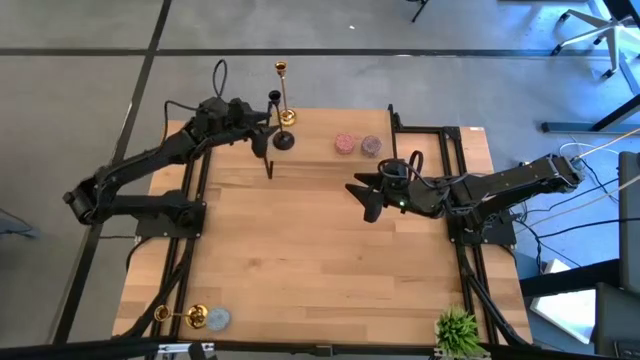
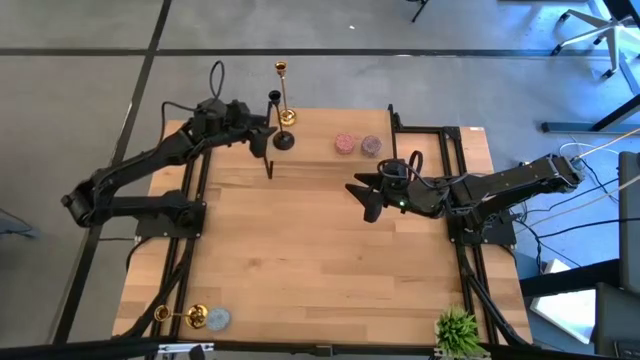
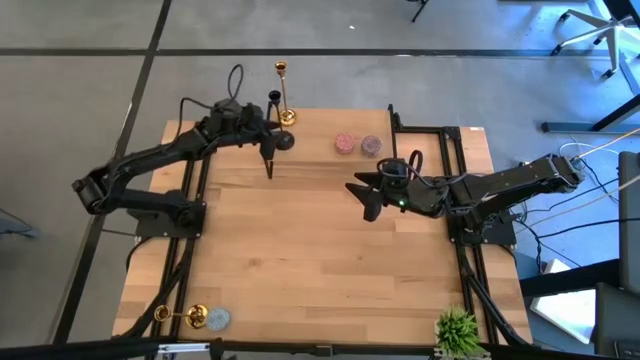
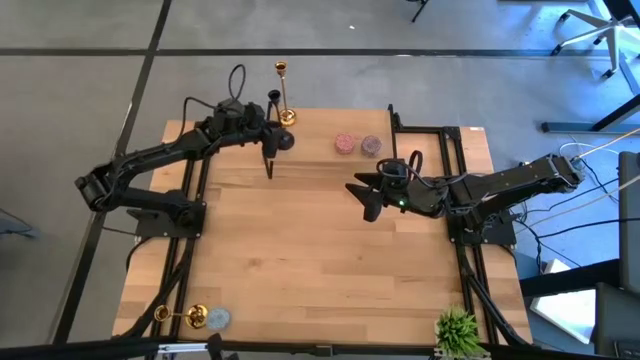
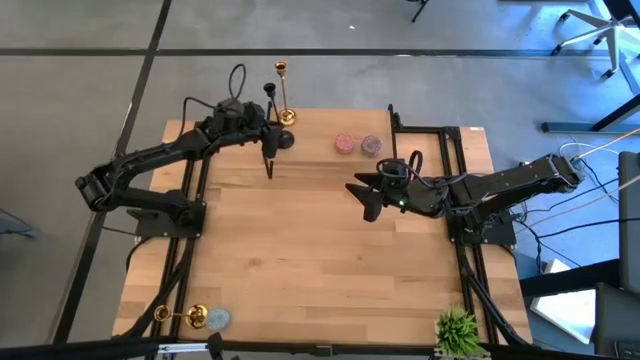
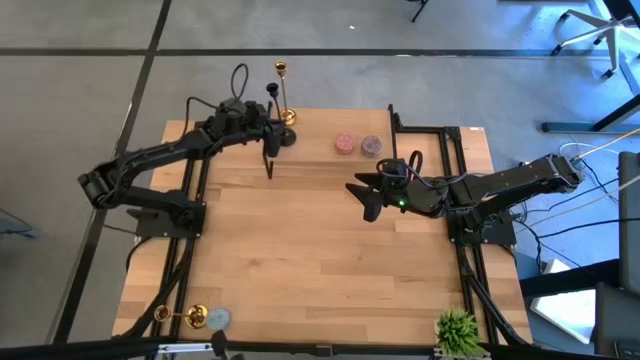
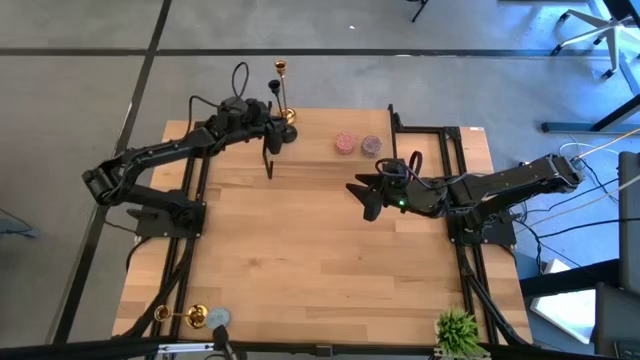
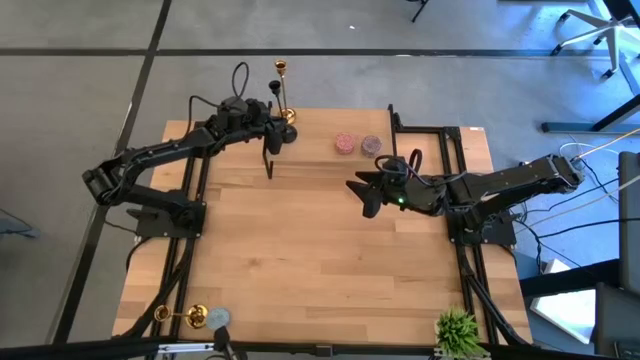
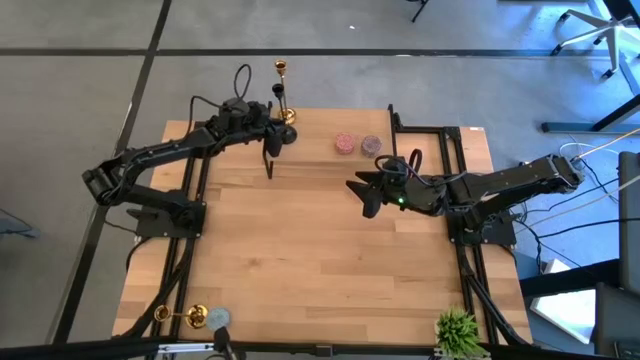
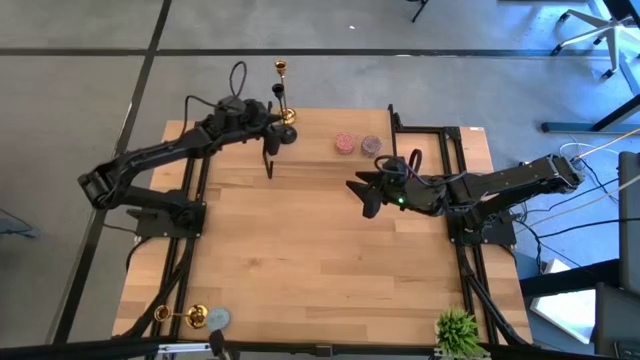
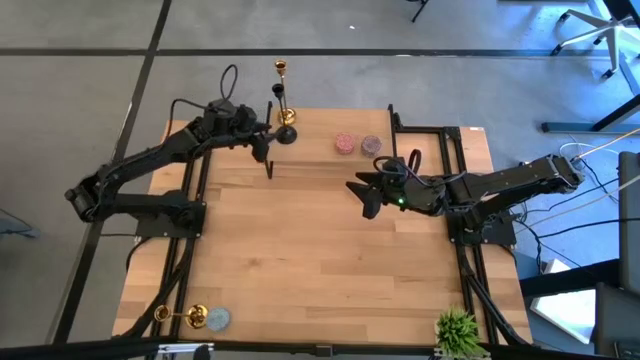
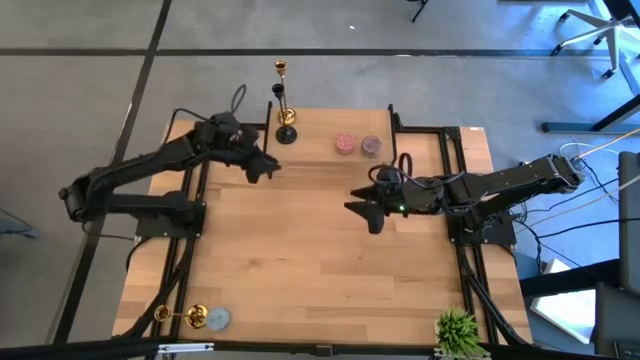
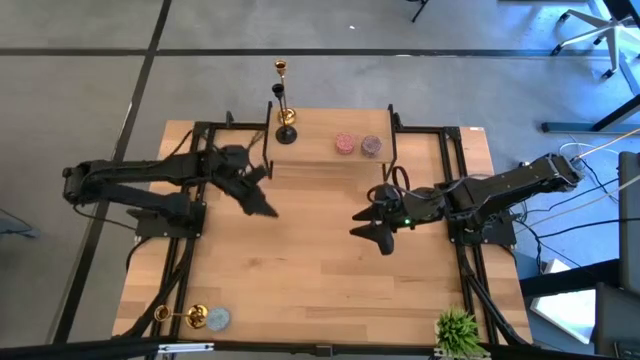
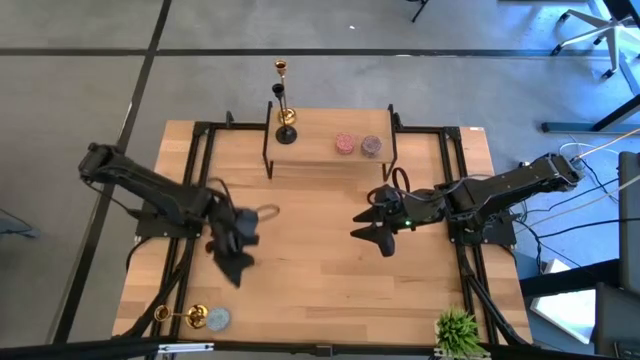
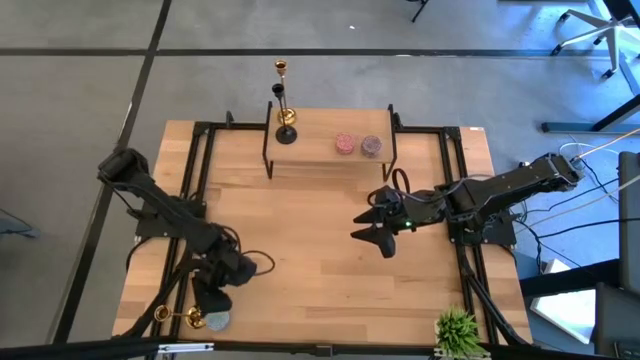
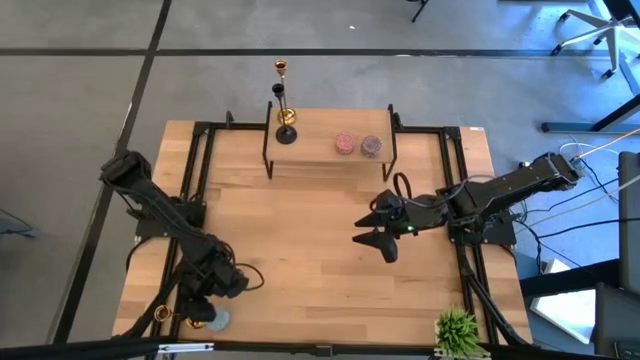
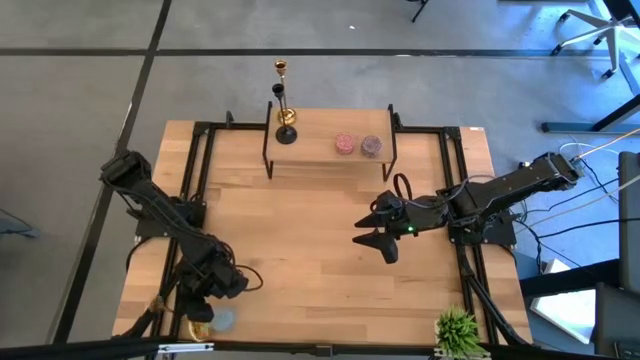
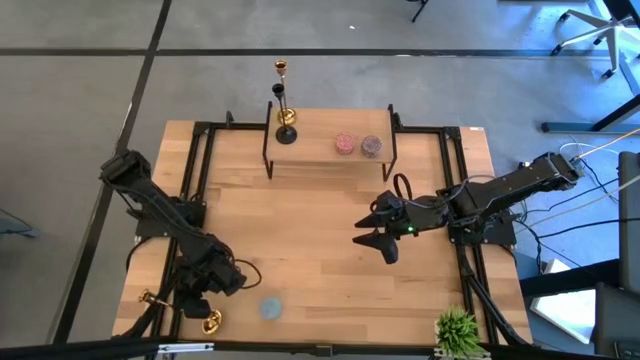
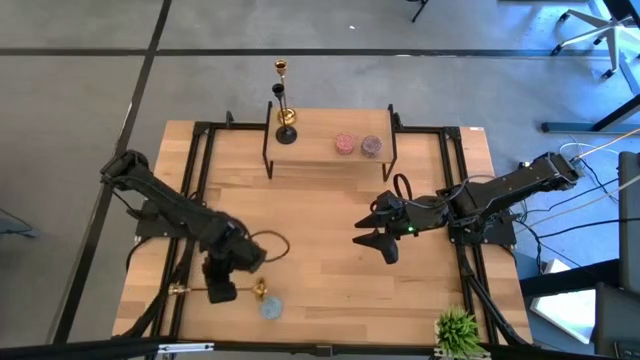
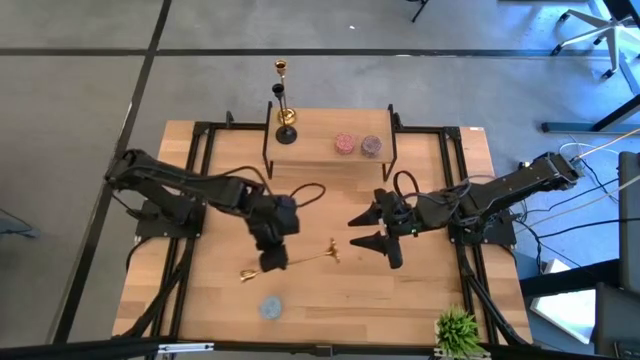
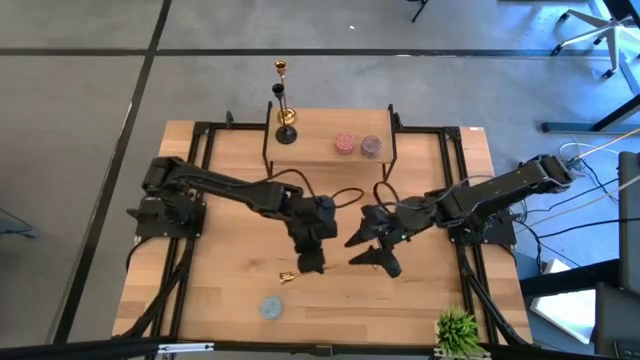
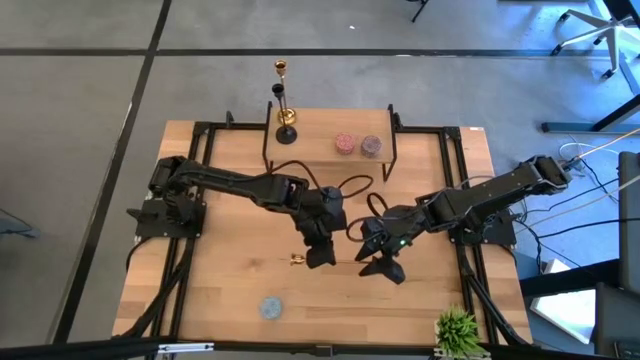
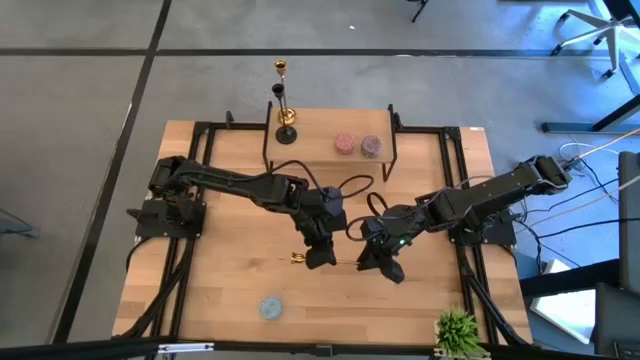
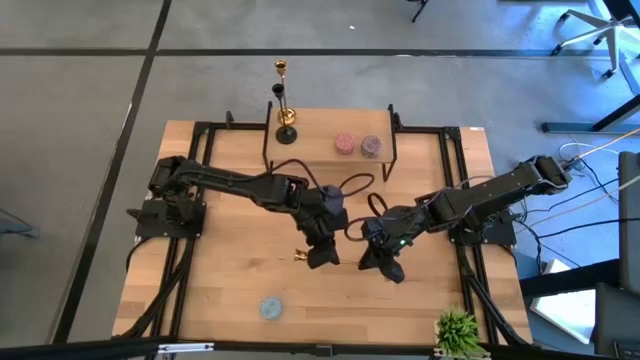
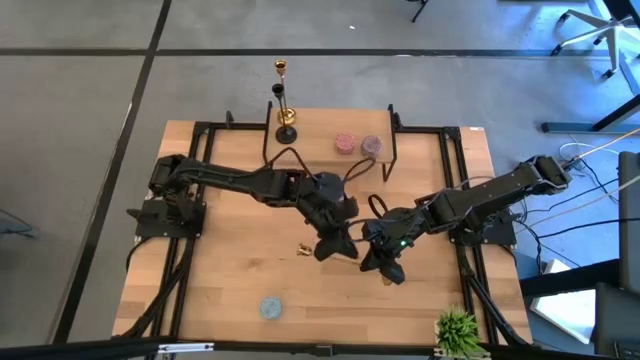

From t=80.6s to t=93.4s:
Task: Pick & Place candle stick holders
Put the gold brass candlestick on the shelf

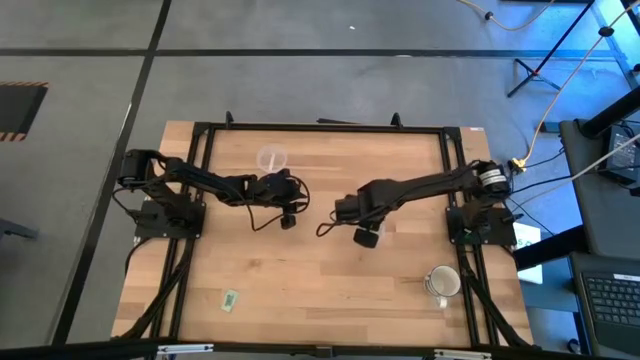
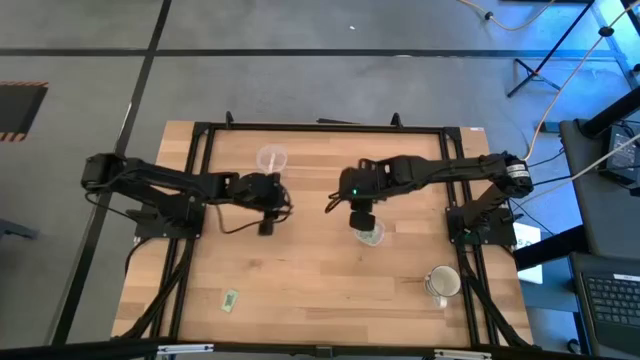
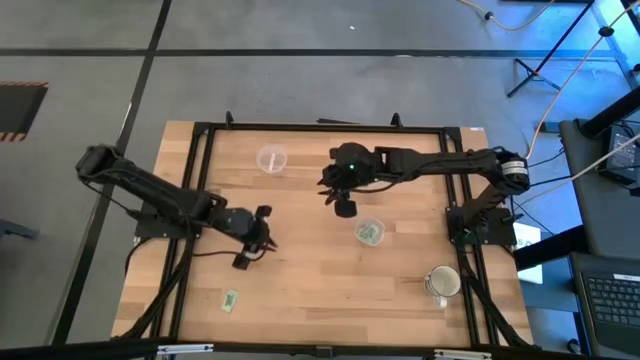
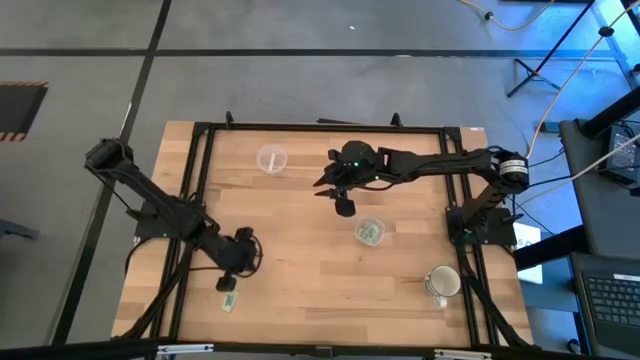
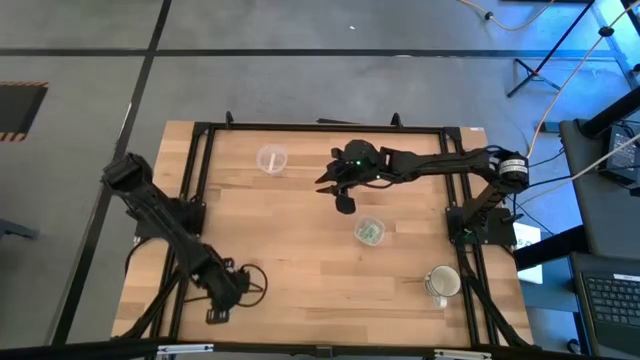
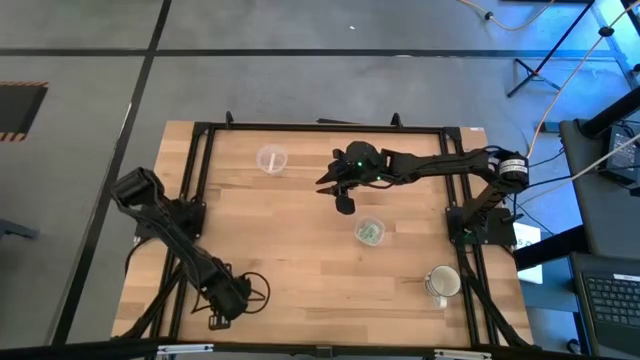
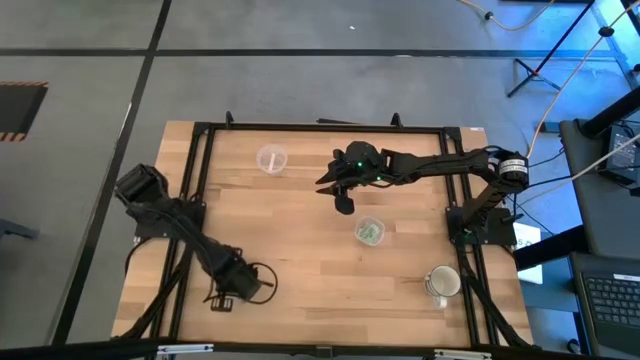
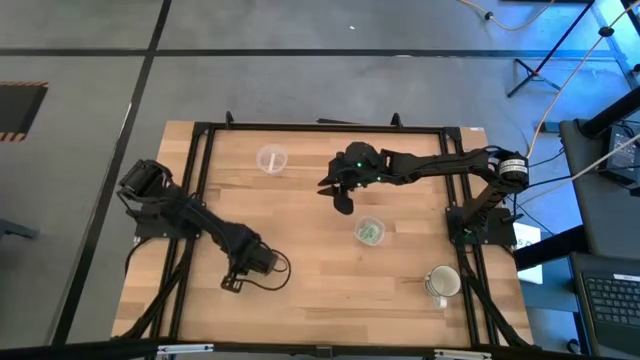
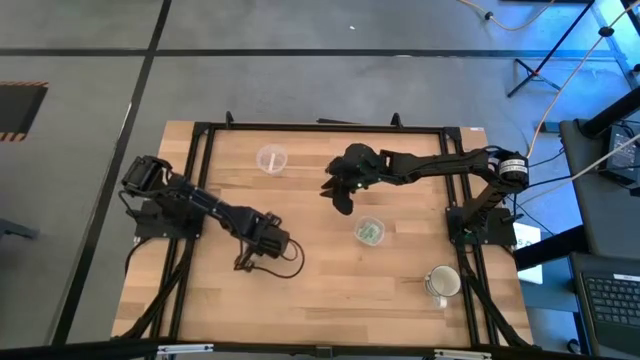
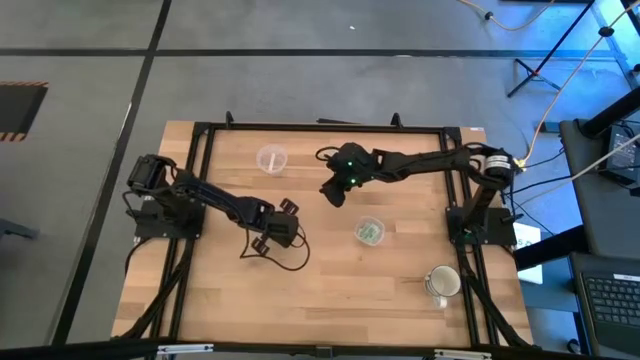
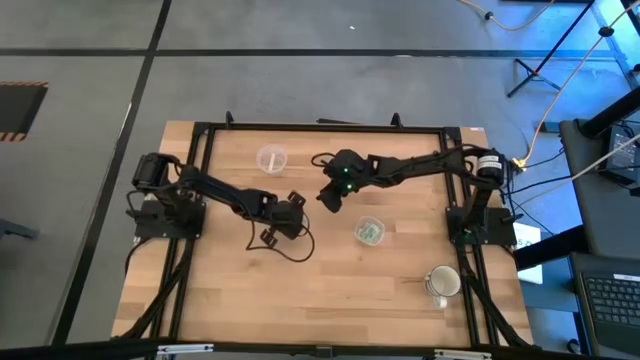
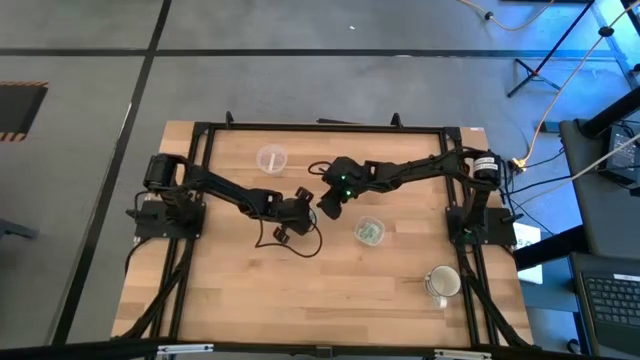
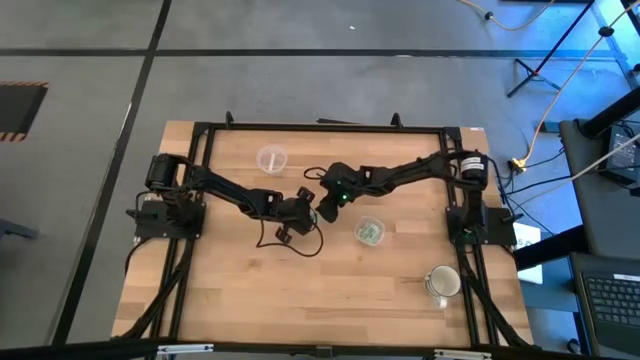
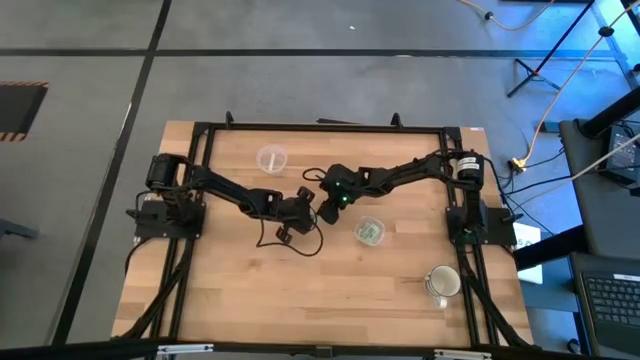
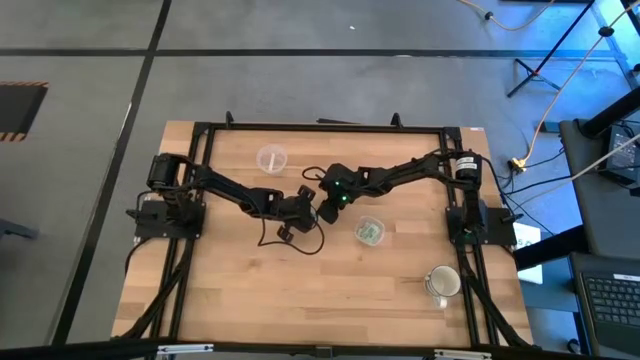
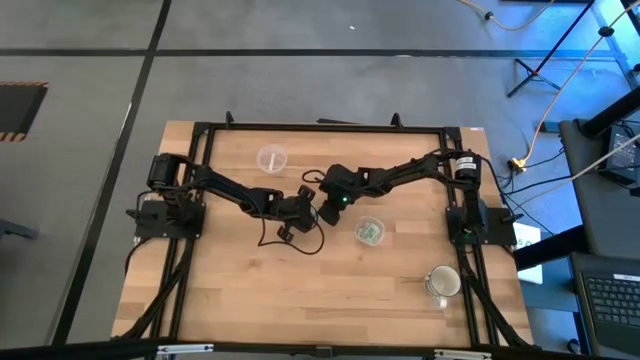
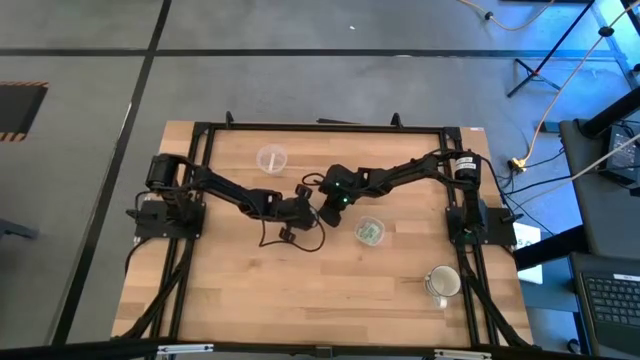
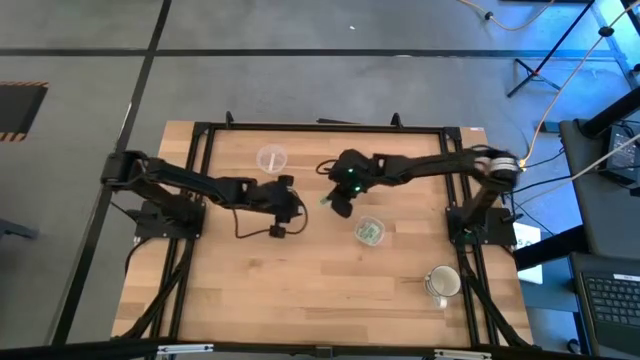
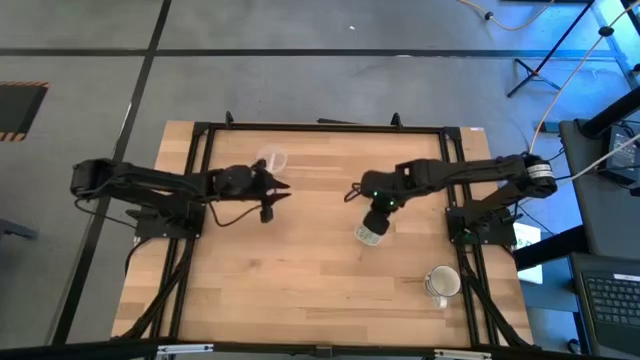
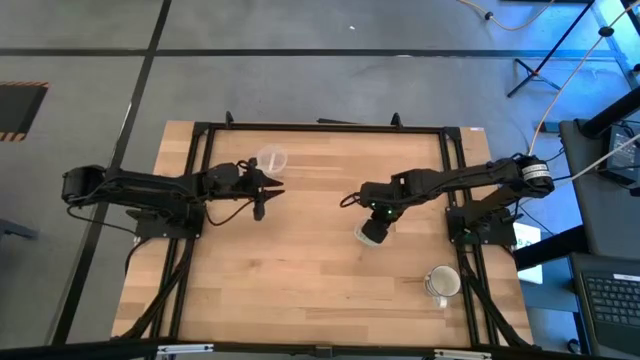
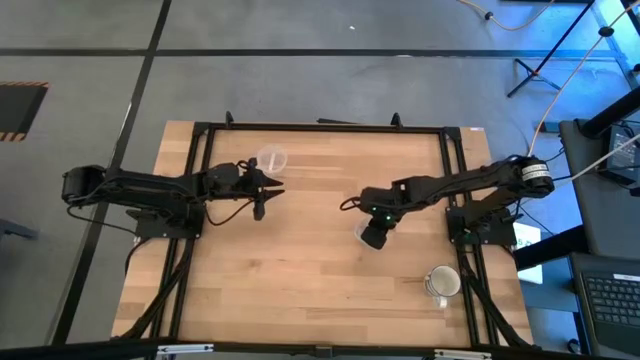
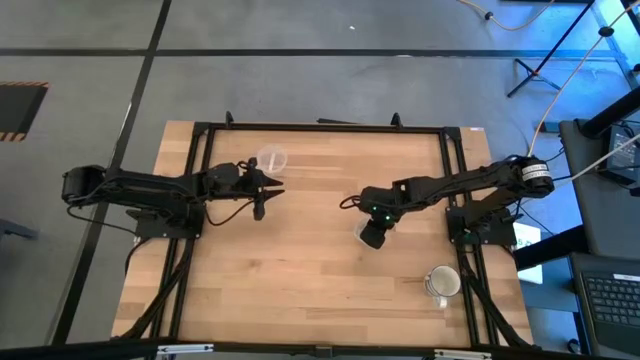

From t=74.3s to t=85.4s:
Task: Pick and place Stevia / Truvia into bins
Put the stevia packet into the bottom transparent container
